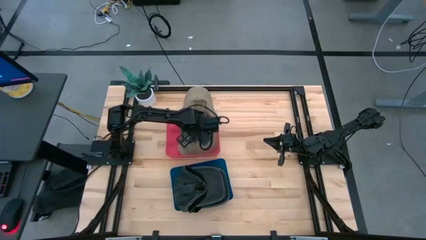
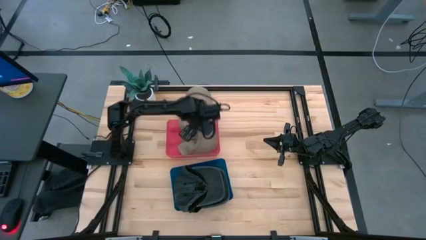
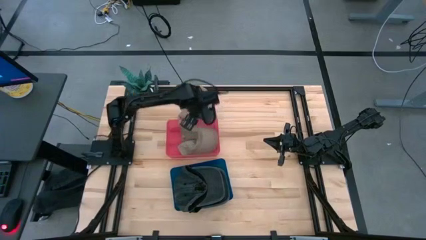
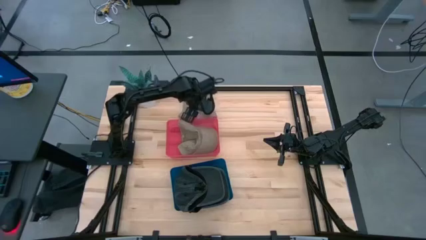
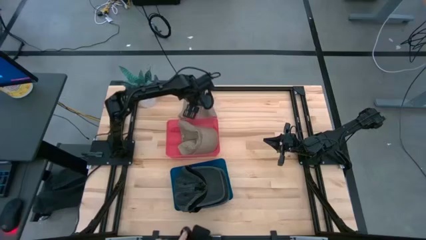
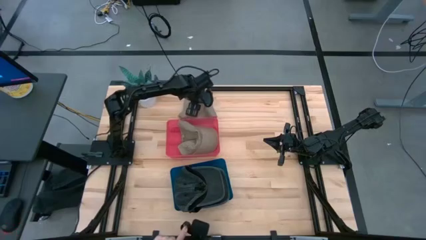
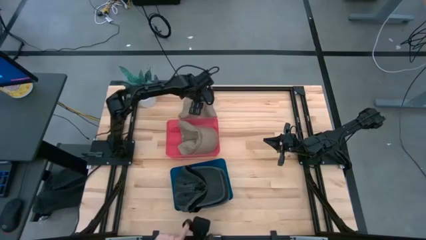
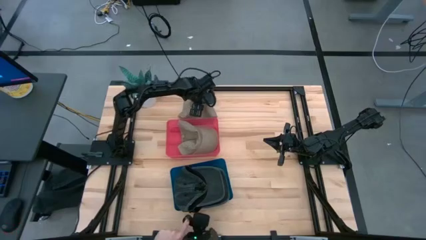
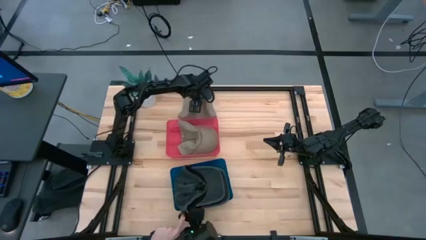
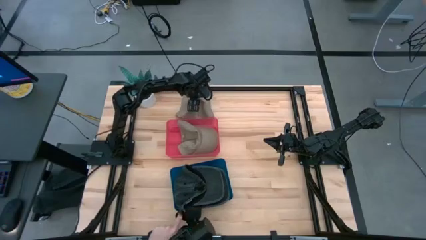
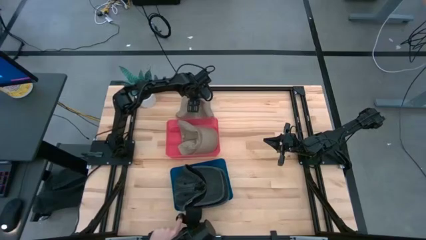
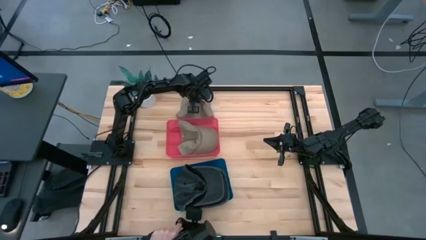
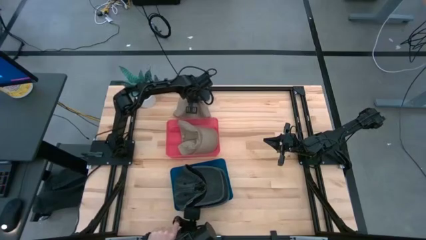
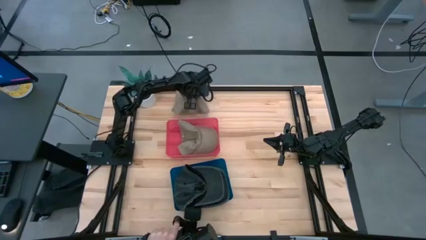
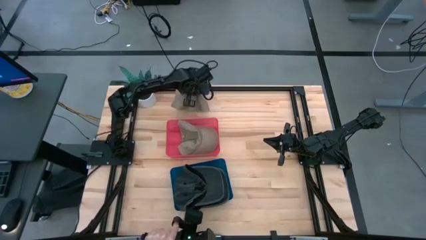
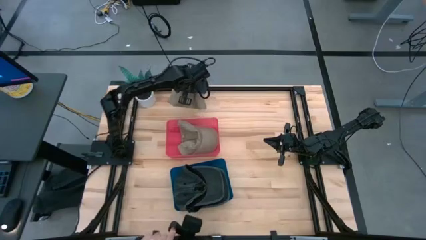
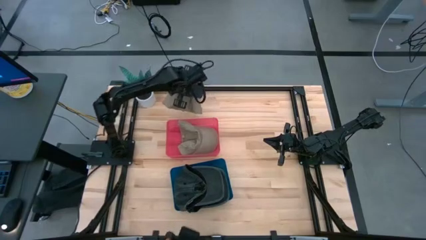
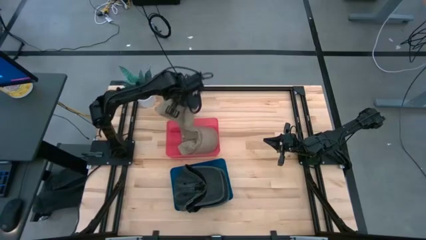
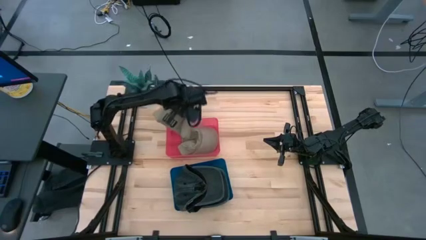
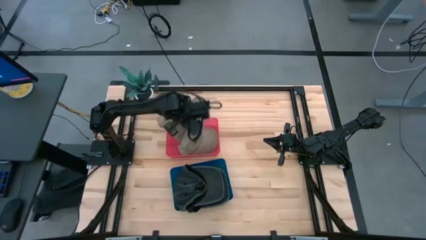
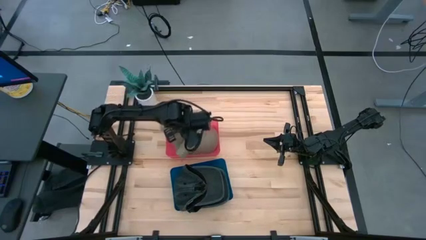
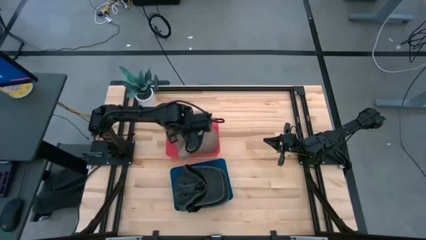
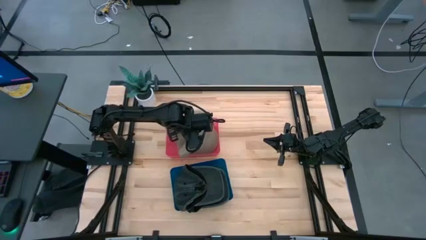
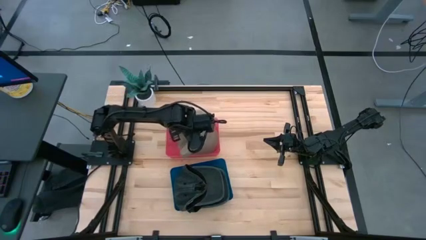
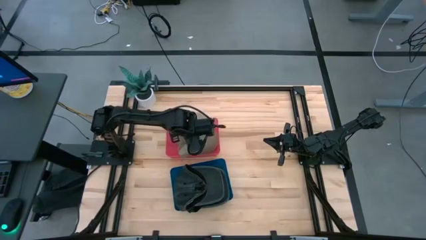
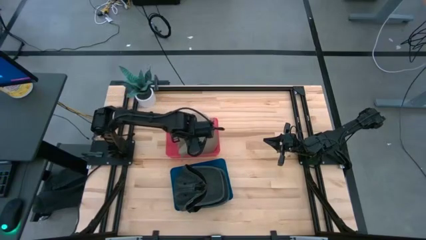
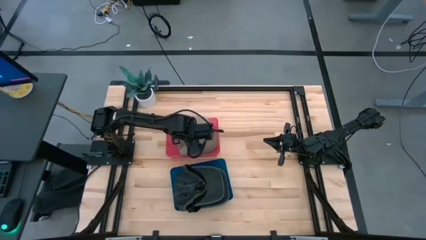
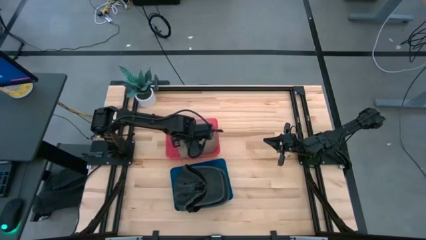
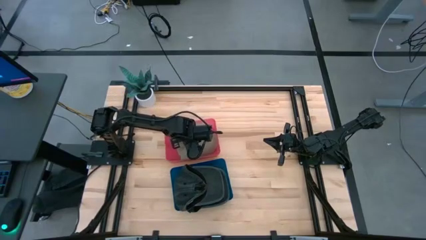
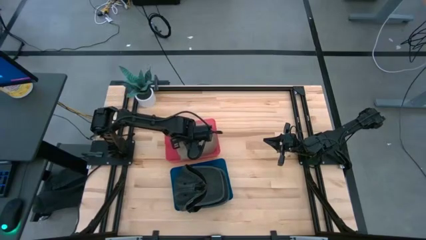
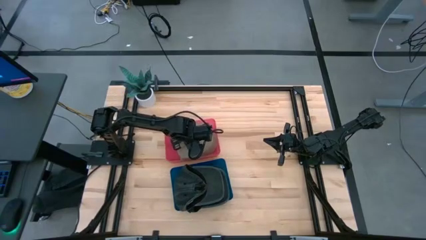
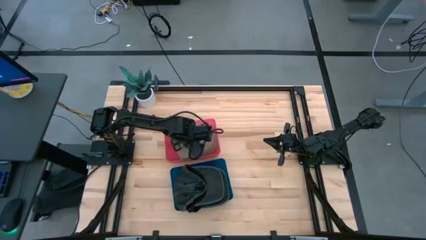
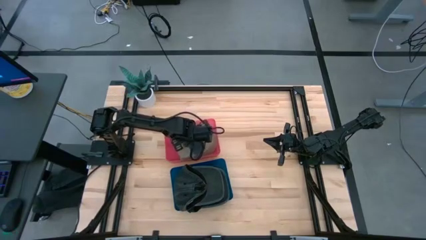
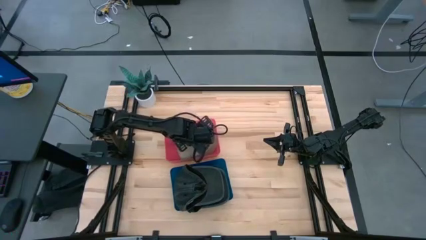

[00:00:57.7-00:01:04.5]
Task: Pick & Place hat
Put the brown cap into the pink bin
